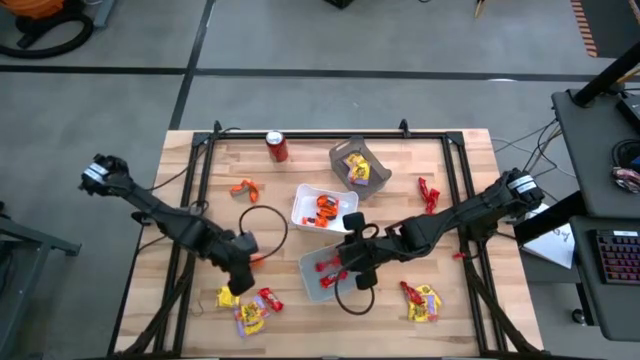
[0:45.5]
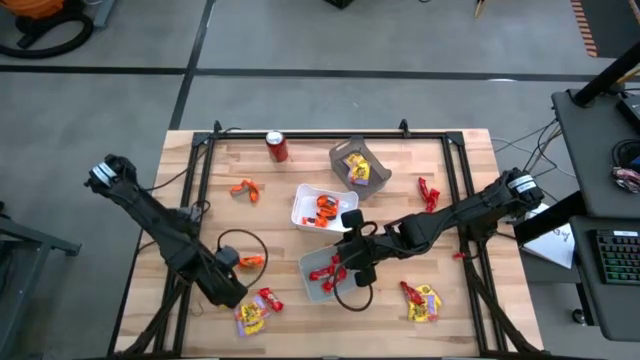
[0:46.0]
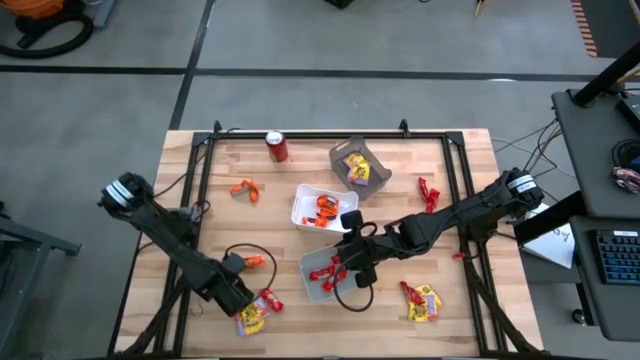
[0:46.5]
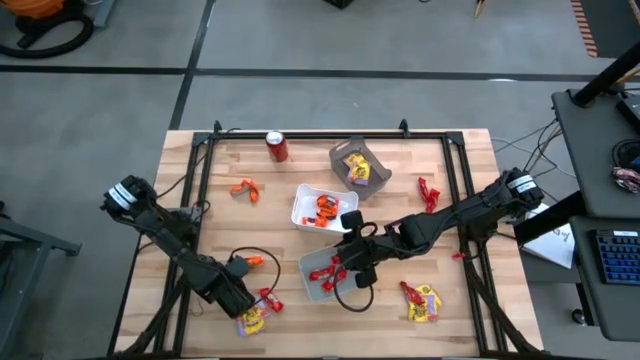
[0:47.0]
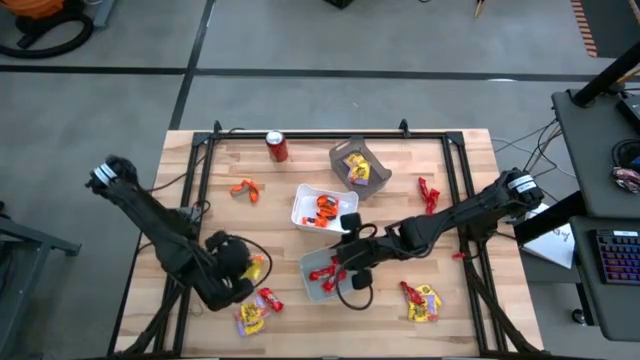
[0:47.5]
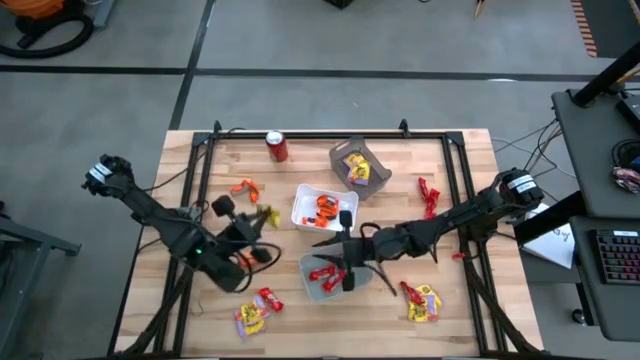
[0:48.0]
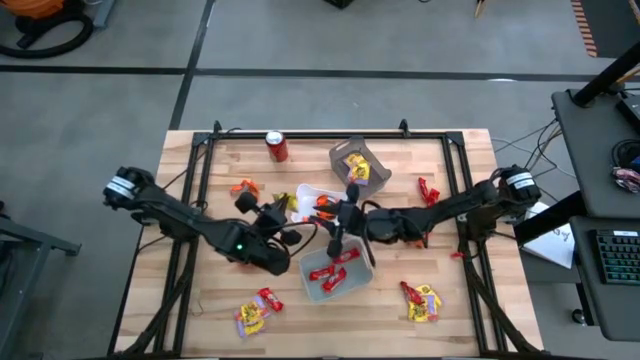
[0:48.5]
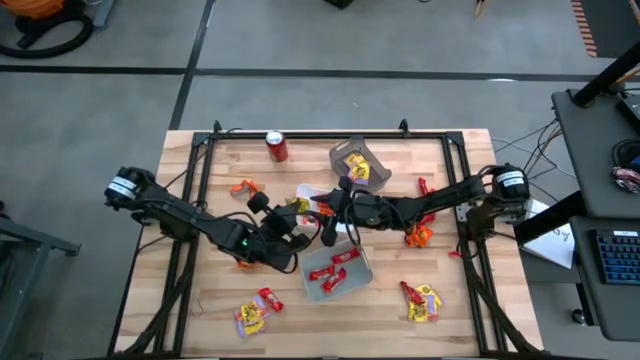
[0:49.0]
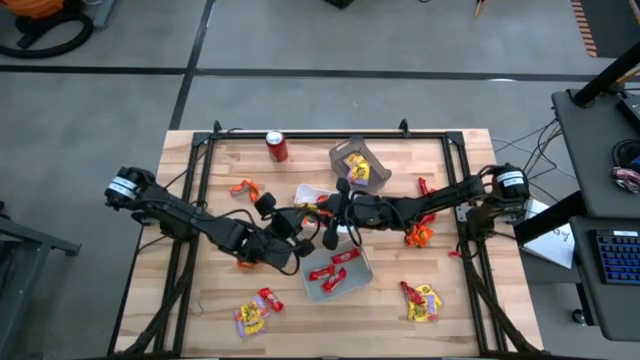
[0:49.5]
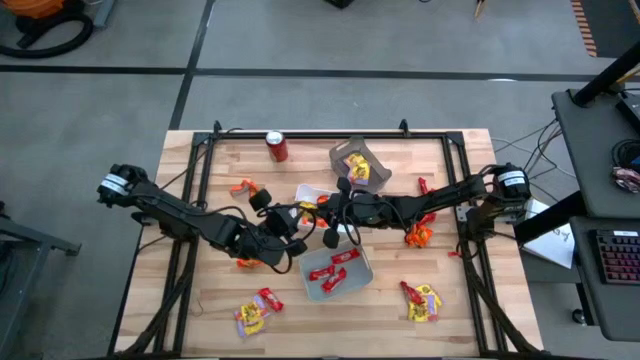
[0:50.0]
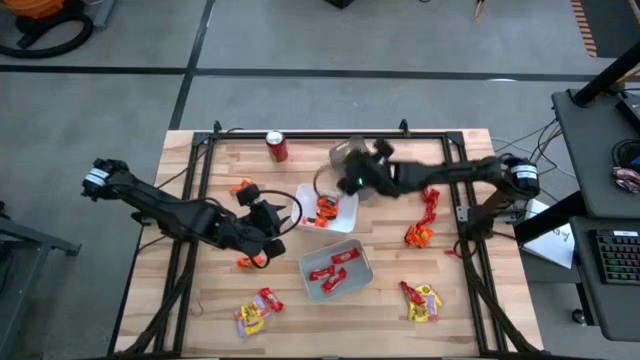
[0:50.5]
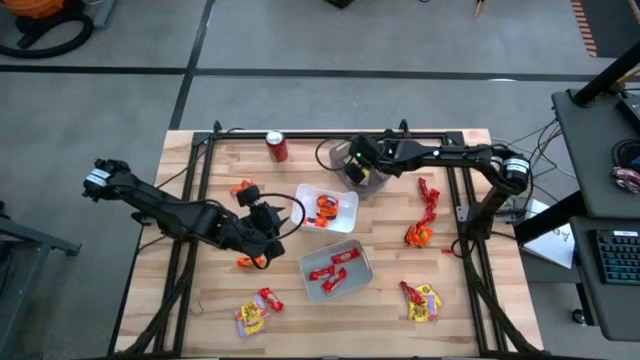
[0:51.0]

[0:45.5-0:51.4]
Task: Sort candy
Put the yellow candy pack into the black bin

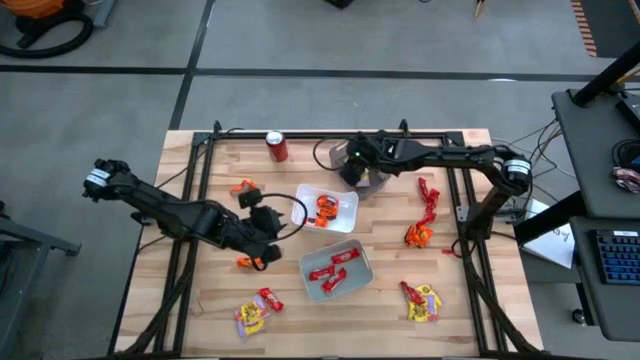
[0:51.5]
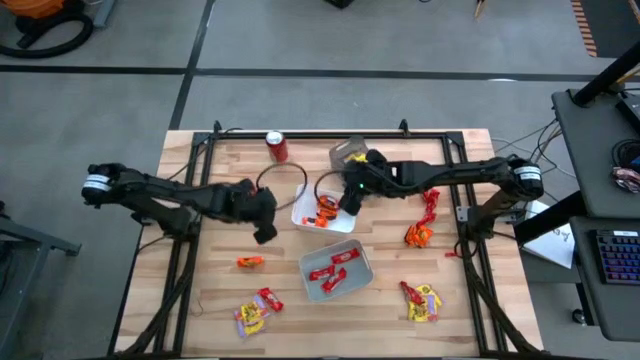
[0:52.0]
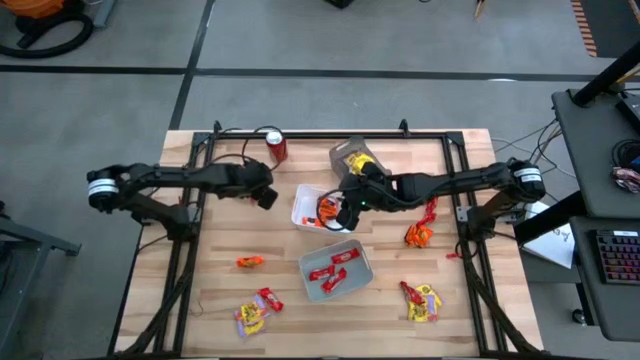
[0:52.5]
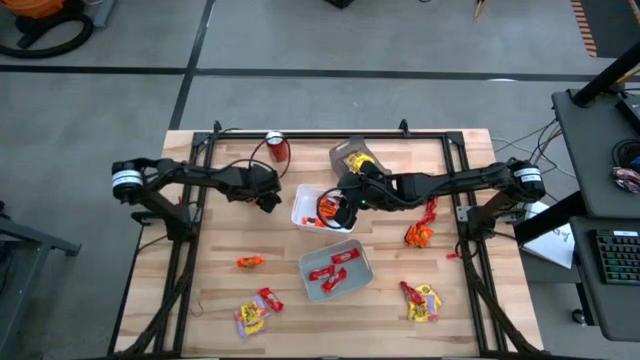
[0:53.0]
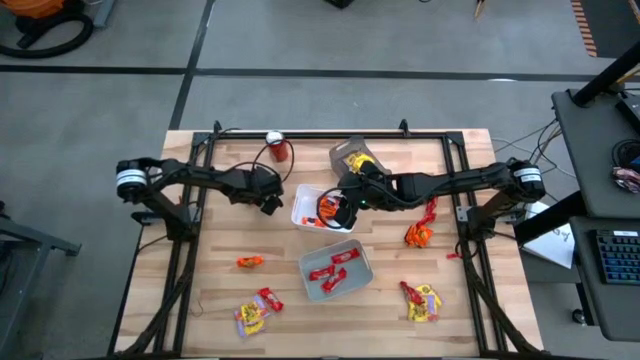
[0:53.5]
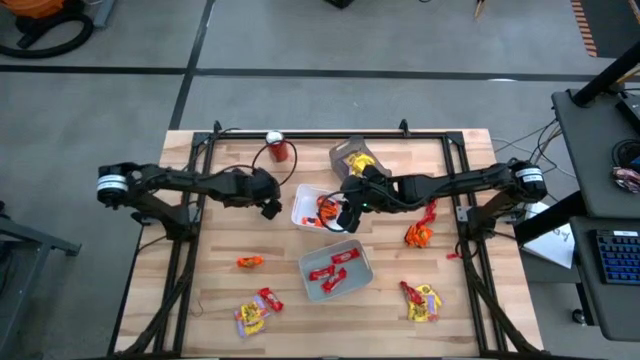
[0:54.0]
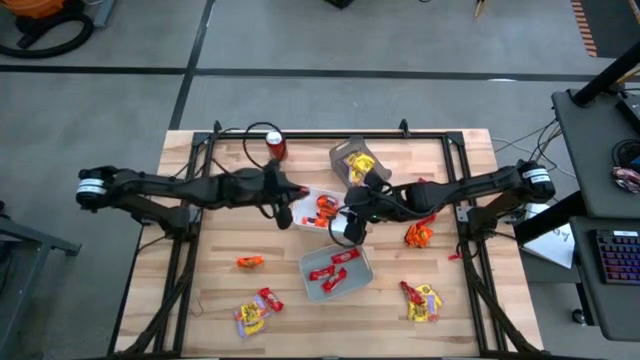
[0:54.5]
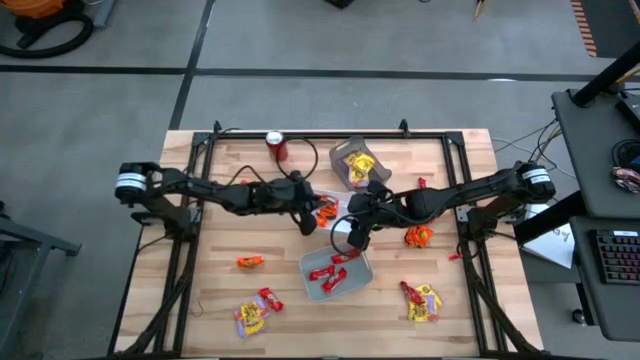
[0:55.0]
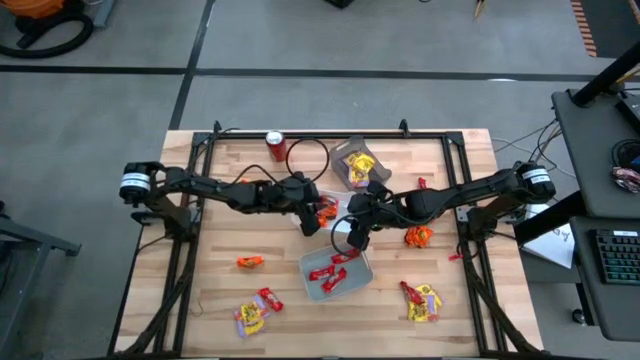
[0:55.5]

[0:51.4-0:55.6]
Put the orange chocolate pack into the white bin

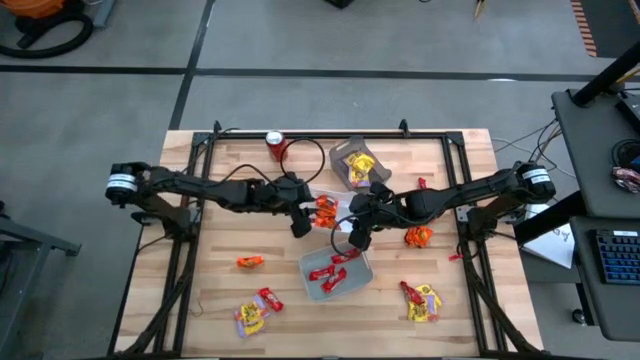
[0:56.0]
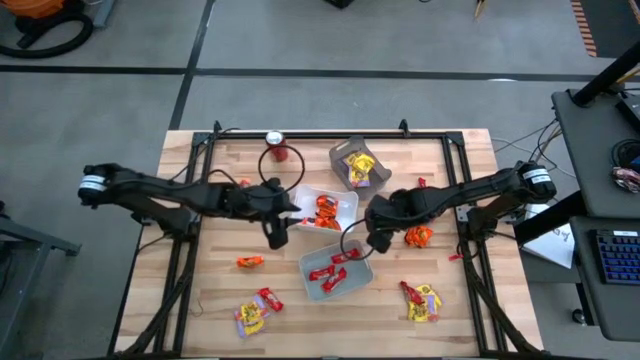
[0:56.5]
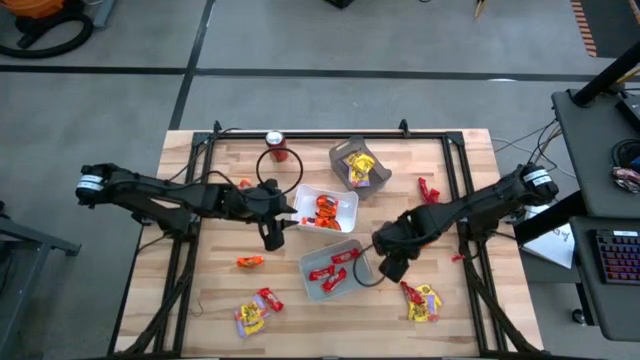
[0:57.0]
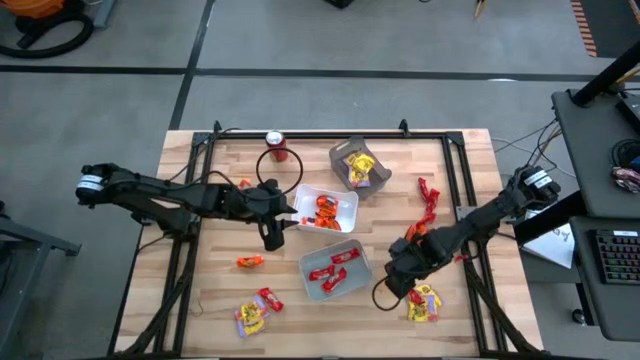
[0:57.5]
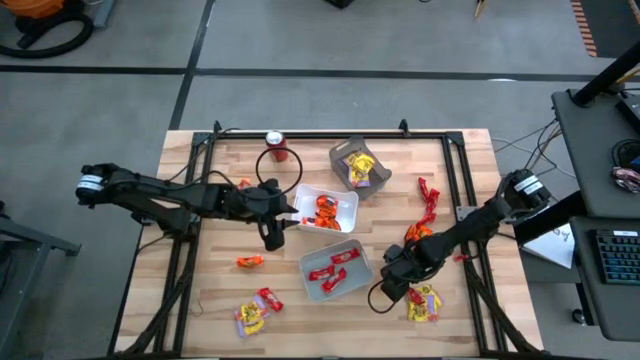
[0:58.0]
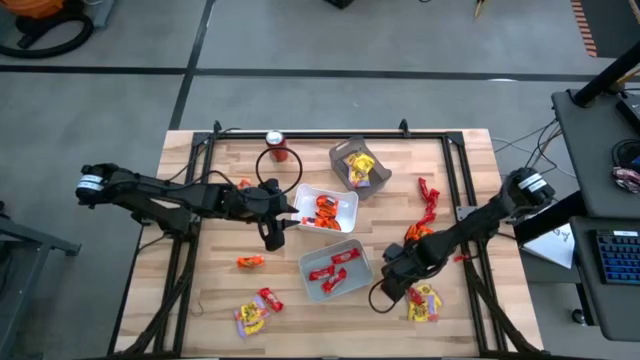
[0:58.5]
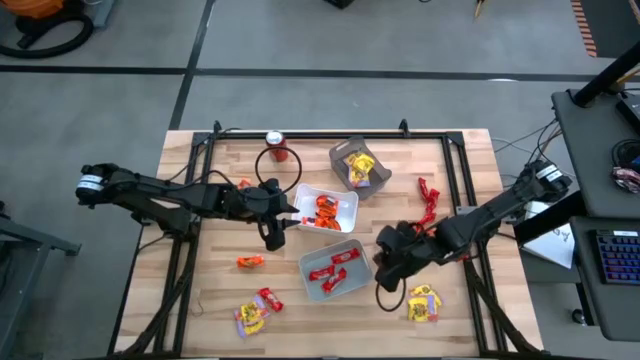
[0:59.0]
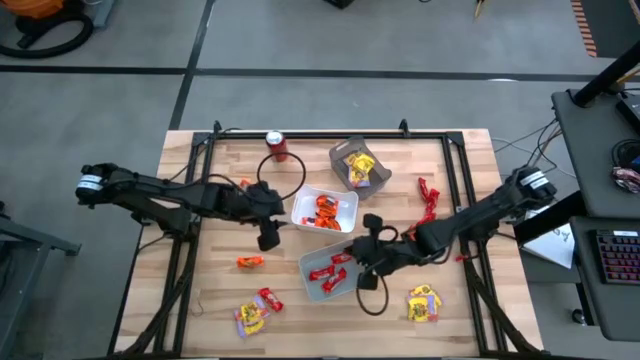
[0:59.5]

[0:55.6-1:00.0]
Put the red chocolate pack into the gray bin

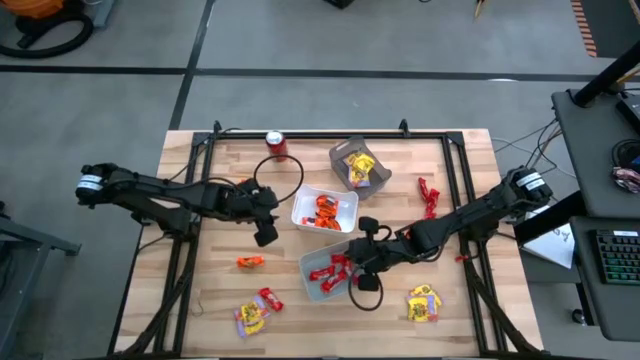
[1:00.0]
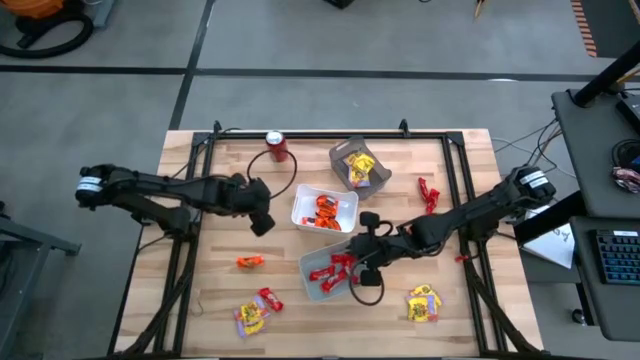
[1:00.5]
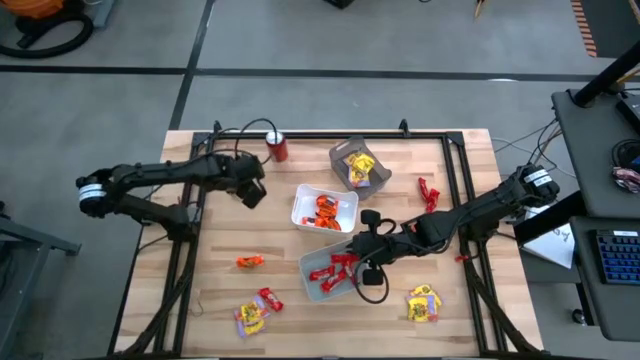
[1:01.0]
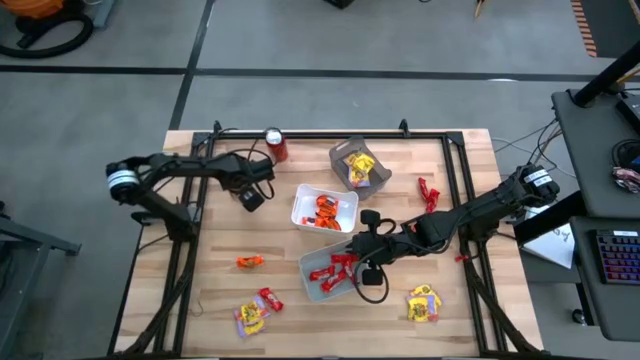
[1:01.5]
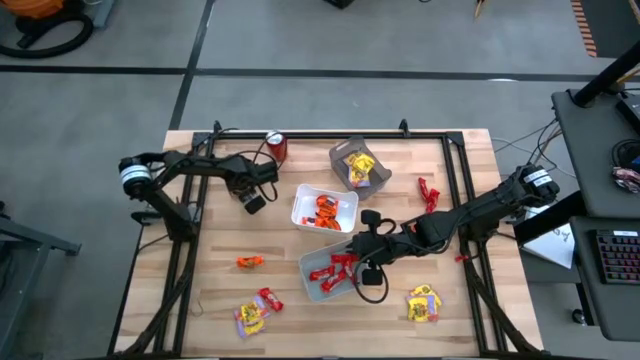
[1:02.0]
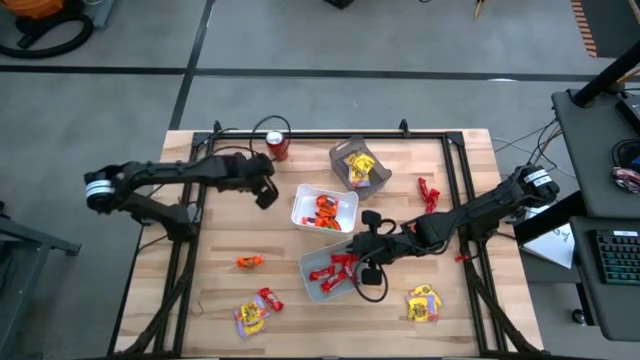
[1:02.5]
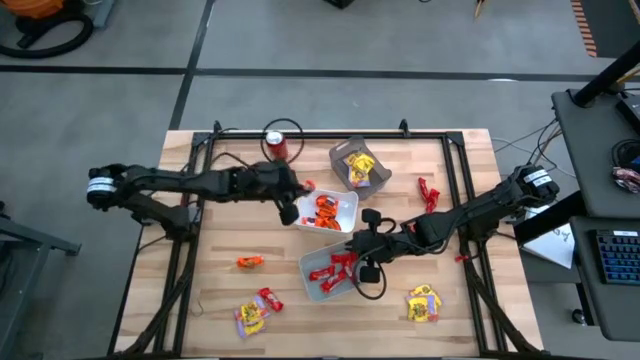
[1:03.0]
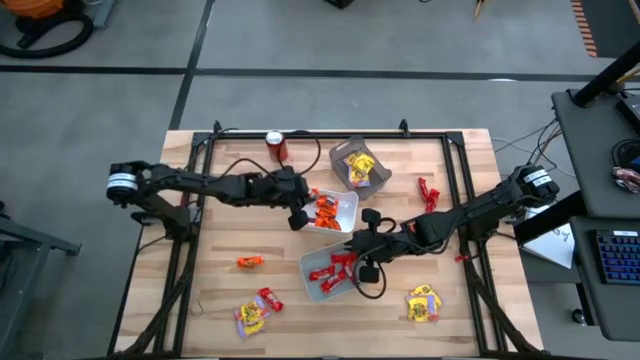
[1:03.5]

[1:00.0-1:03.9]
Put the orange chocolate pack into the white bin

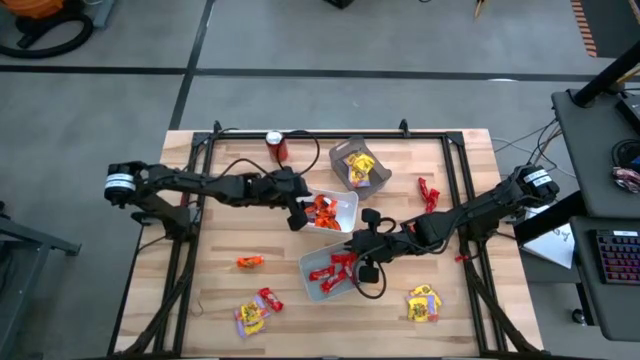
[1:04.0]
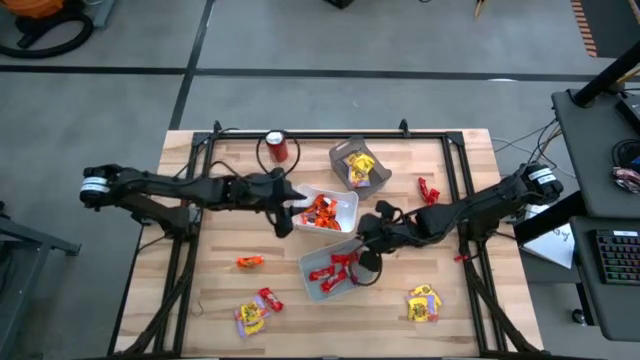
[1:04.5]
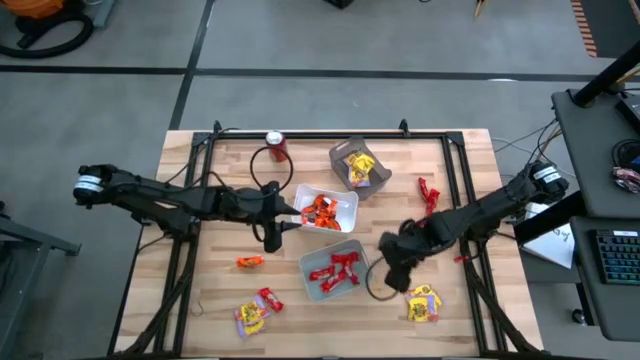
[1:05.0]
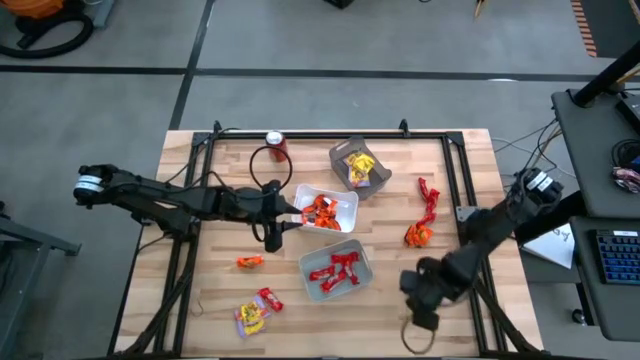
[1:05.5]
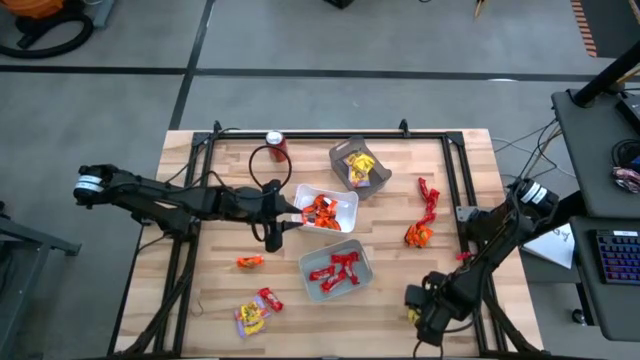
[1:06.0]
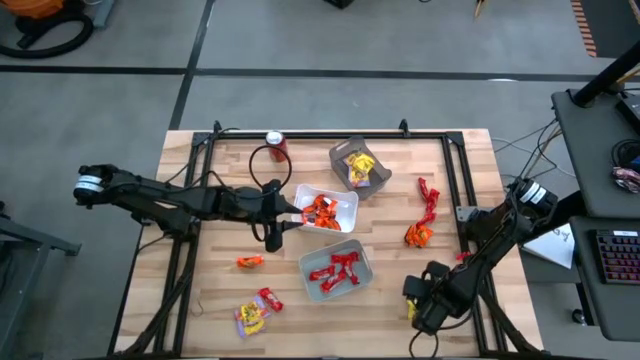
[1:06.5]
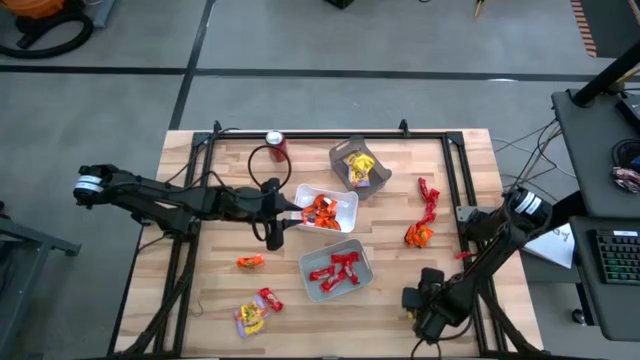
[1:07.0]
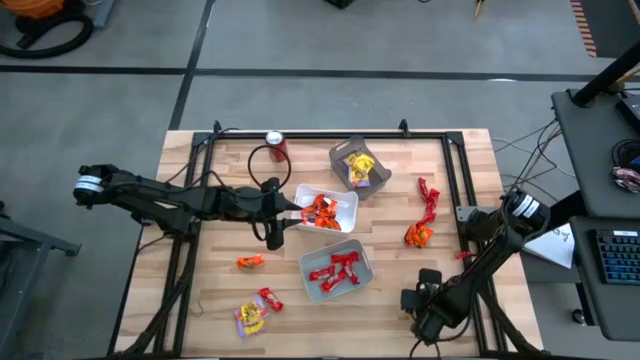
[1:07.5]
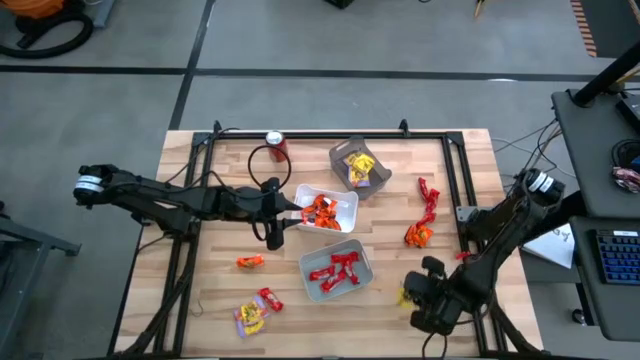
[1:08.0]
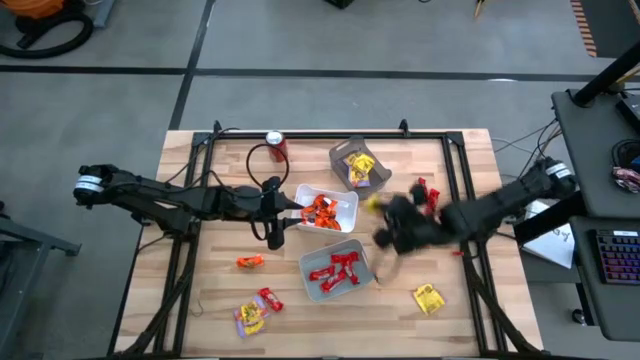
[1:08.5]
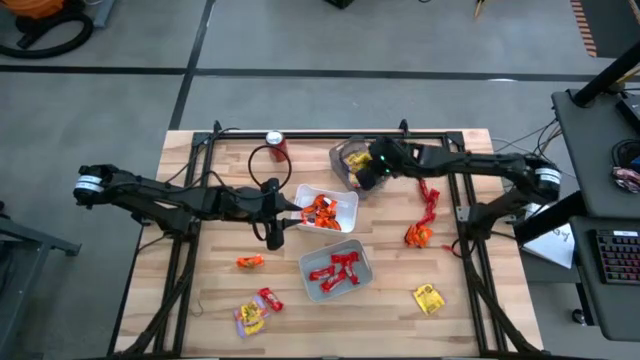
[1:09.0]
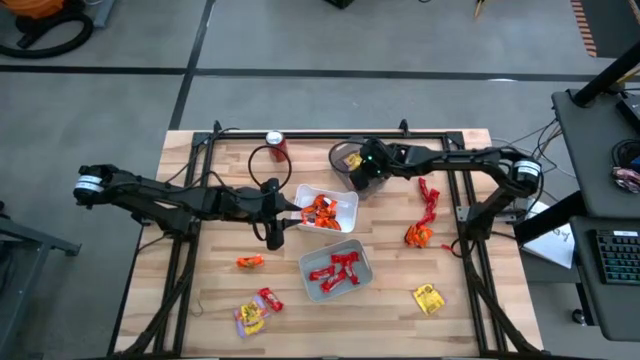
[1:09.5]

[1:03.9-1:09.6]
Put the yellow candy pack into the black bin
